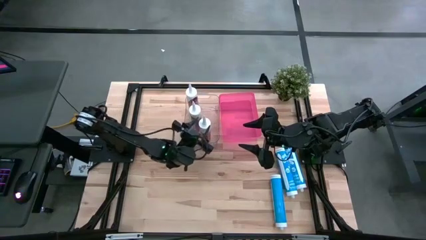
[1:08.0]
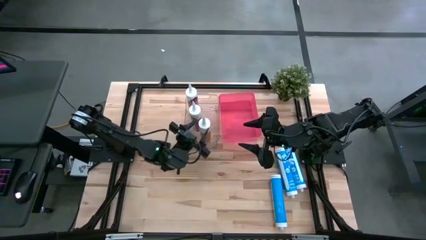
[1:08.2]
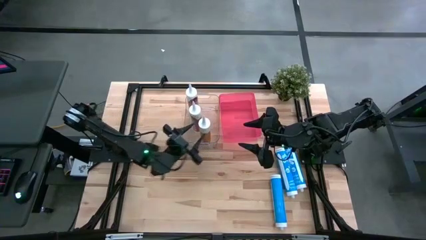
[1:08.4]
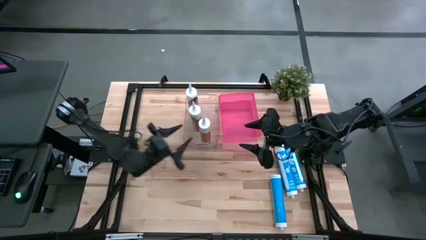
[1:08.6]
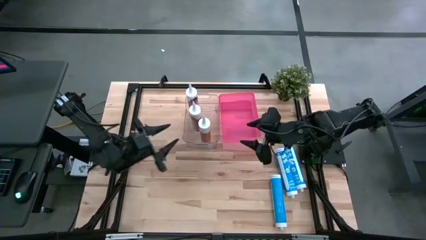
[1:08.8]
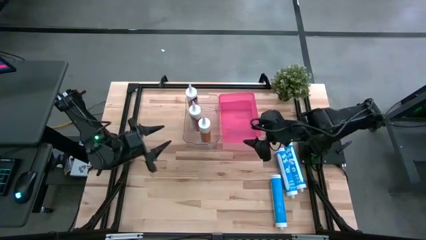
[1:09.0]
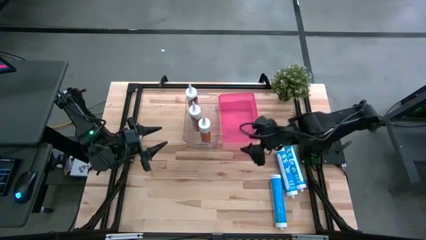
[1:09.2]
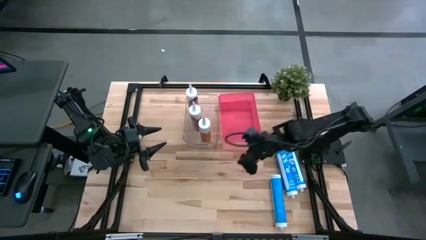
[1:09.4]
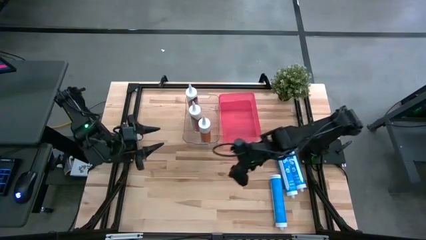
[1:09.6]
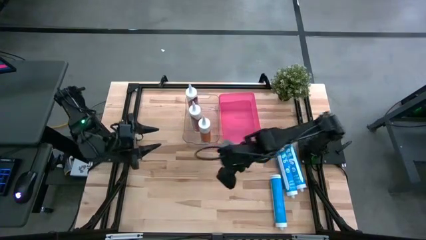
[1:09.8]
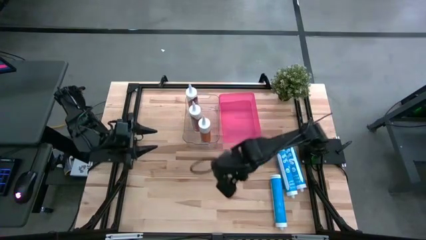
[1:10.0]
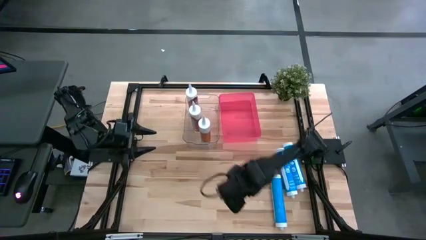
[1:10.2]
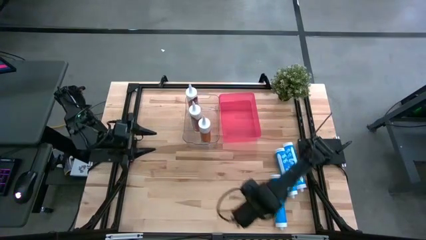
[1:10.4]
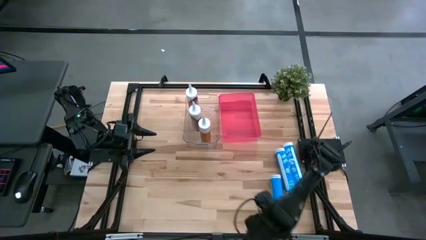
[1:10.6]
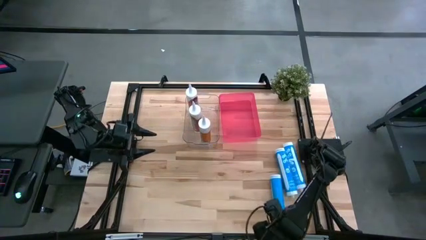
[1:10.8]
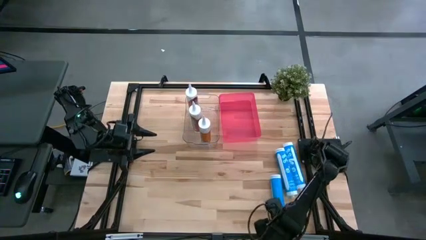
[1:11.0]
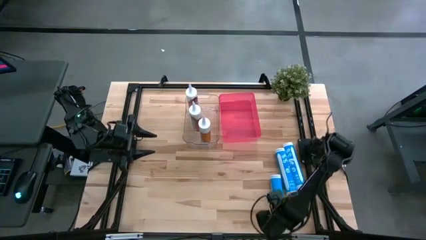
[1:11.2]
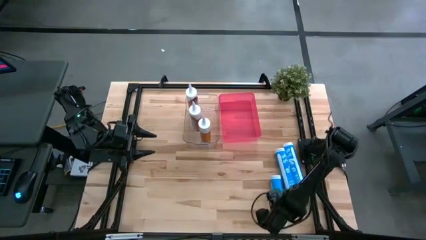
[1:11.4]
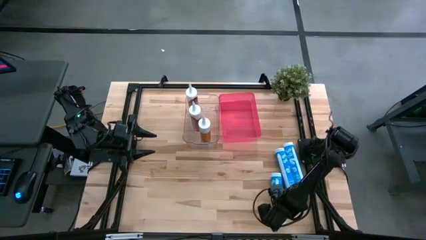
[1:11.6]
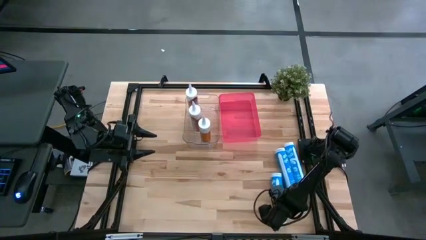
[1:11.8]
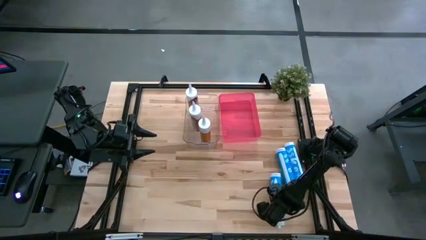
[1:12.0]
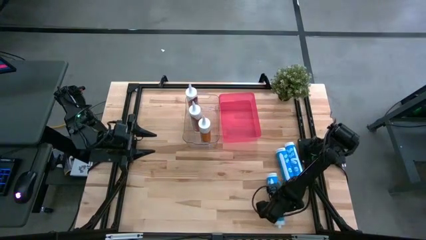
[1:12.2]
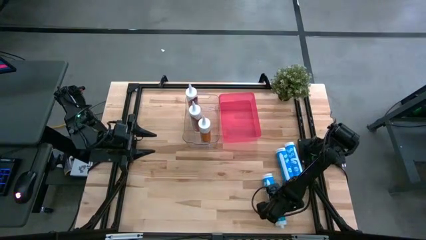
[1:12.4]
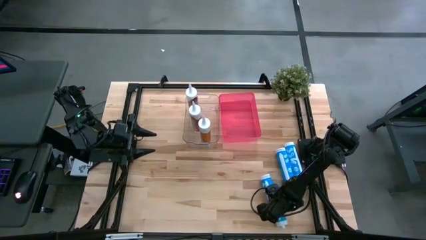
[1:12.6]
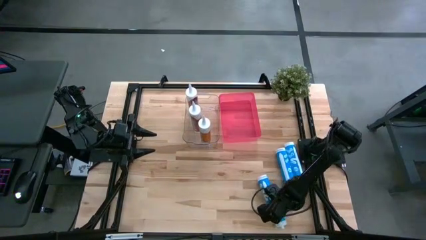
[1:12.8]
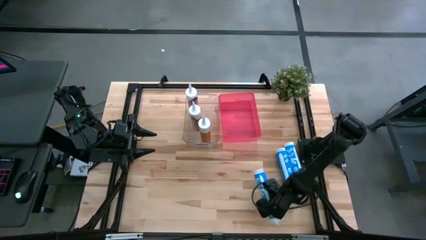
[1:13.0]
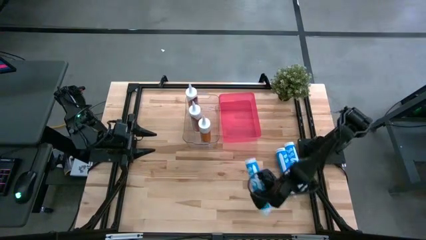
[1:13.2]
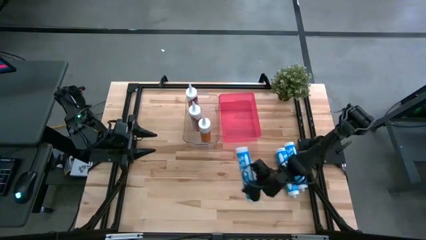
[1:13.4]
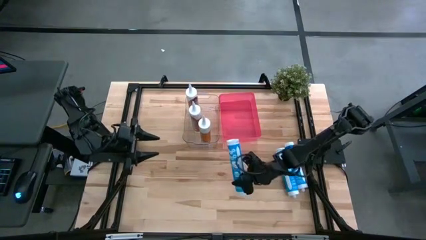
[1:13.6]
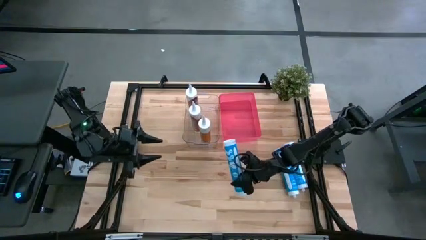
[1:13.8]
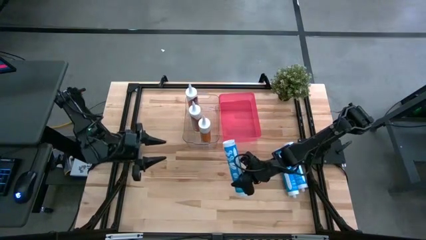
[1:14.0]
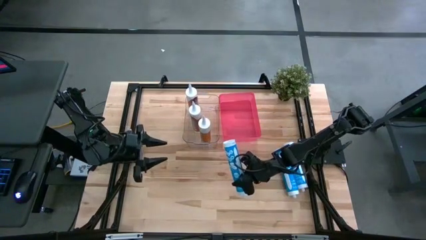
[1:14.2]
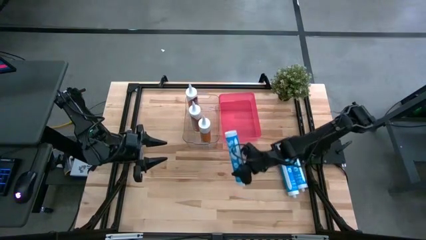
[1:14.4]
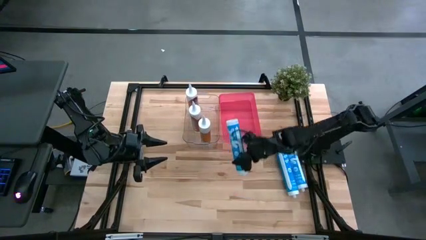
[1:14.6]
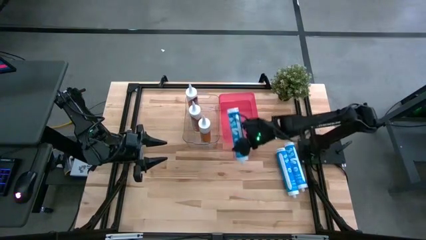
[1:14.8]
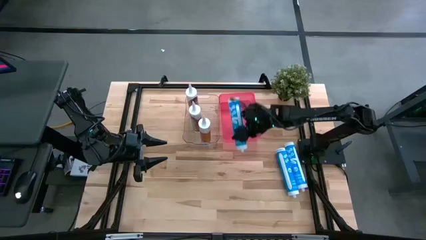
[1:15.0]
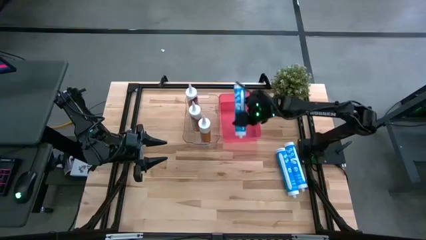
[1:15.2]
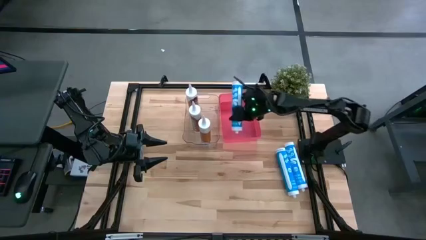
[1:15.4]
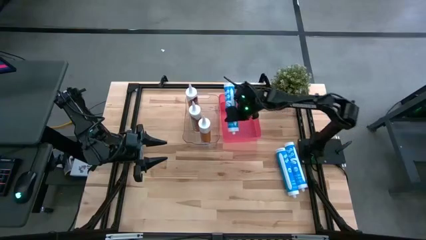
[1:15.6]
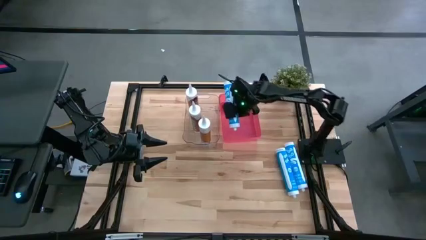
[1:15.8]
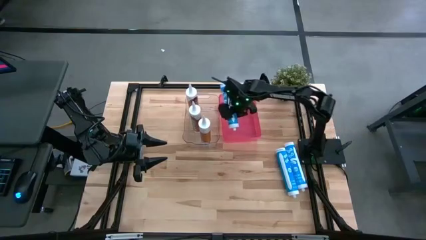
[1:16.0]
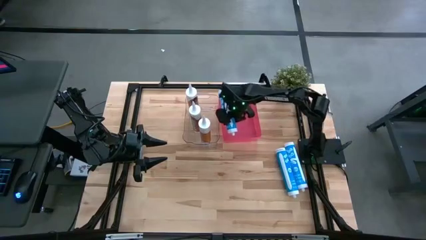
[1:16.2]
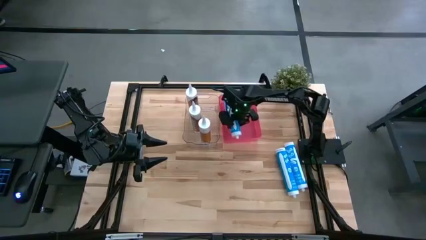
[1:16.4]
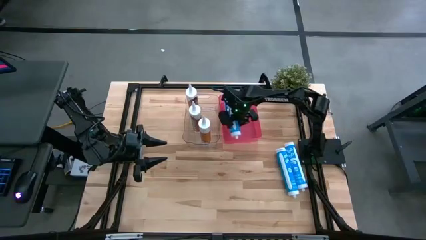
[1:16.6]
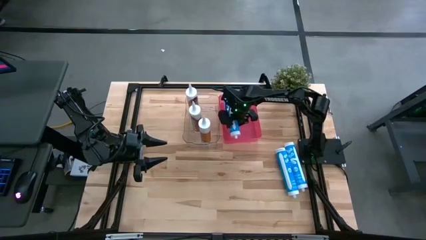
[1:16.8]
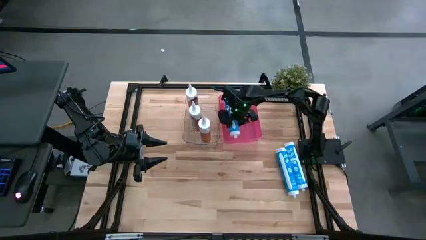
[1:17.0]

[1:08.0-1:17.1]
Task: Pick & place silicon tubes, Sealant and Lysol wipes
Put the bottom blue sealant into the red bin

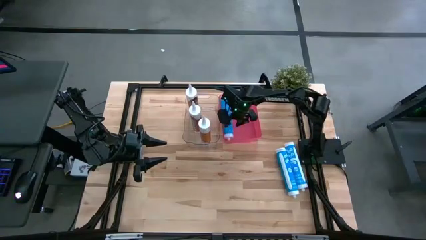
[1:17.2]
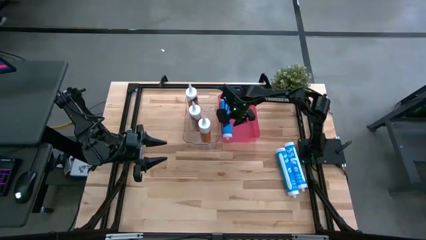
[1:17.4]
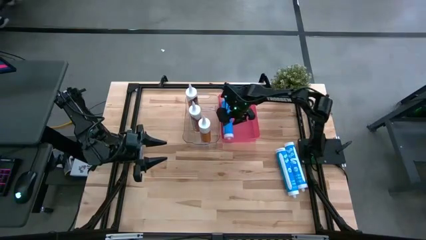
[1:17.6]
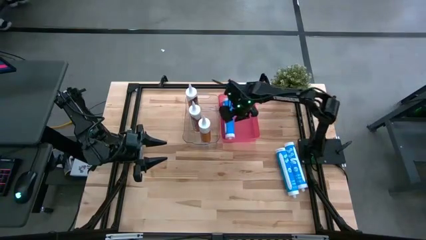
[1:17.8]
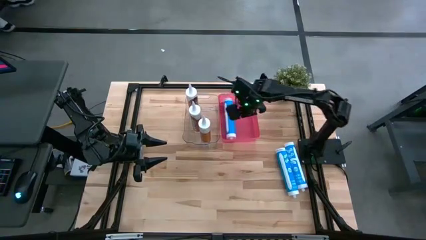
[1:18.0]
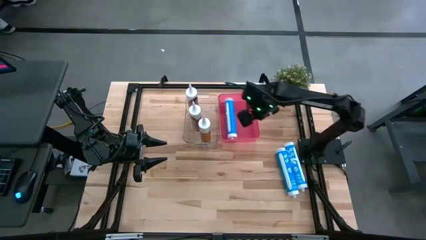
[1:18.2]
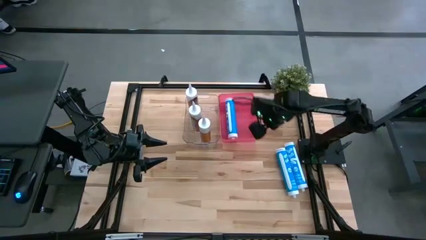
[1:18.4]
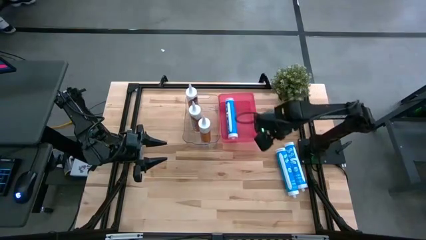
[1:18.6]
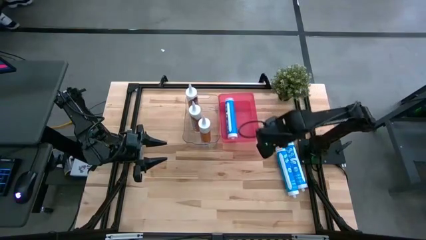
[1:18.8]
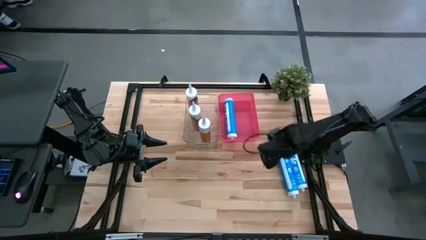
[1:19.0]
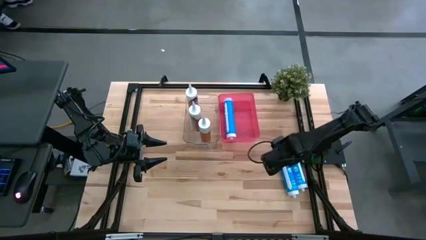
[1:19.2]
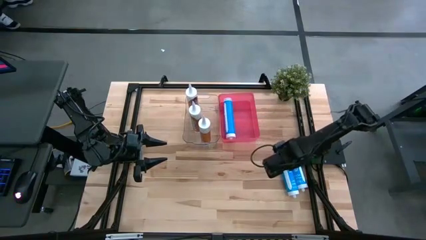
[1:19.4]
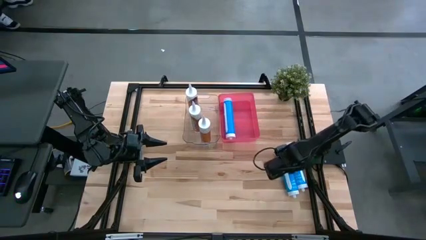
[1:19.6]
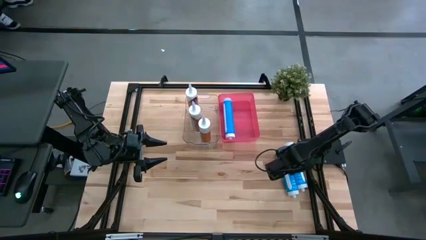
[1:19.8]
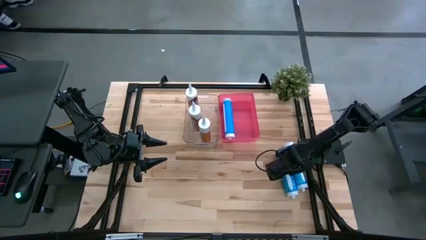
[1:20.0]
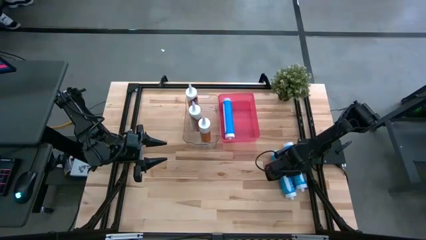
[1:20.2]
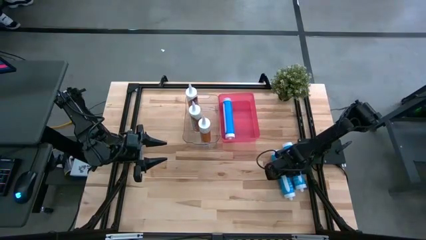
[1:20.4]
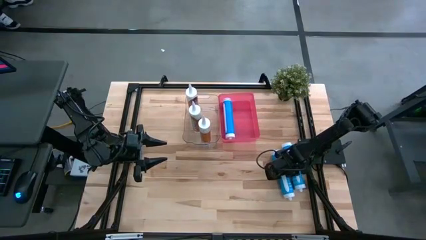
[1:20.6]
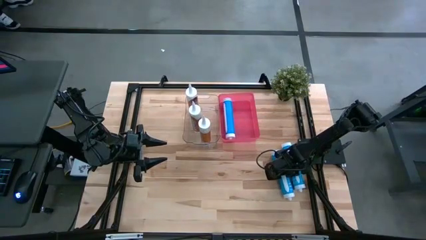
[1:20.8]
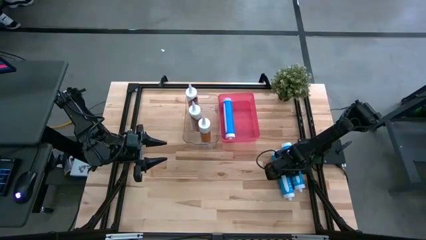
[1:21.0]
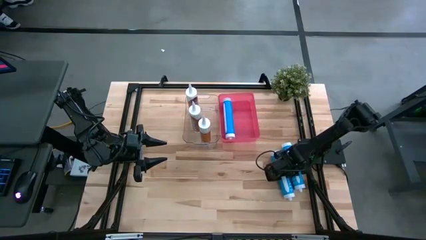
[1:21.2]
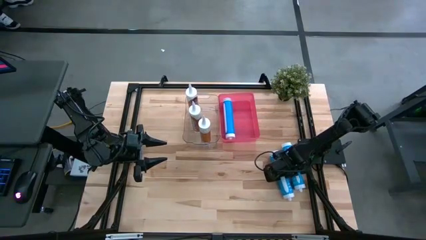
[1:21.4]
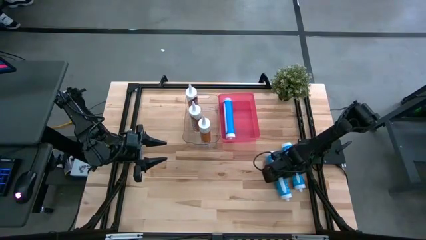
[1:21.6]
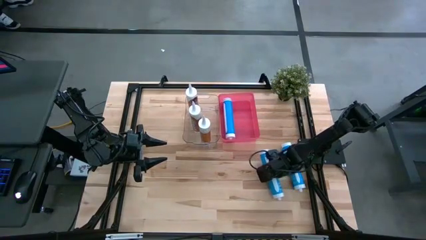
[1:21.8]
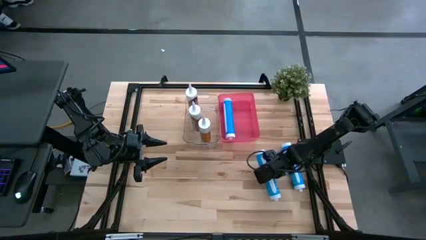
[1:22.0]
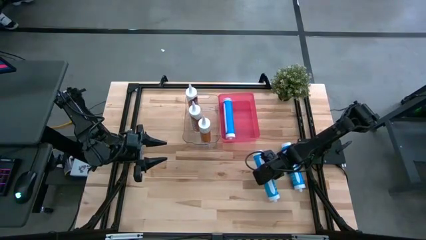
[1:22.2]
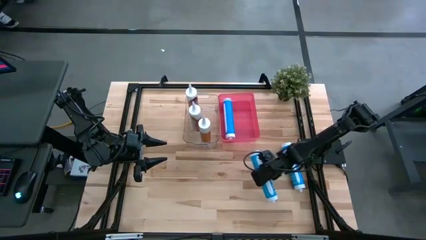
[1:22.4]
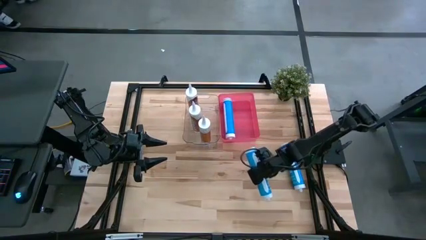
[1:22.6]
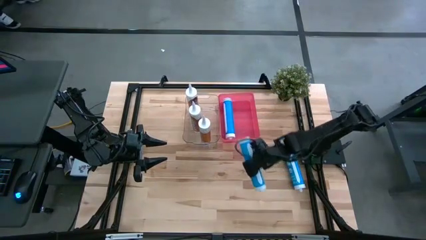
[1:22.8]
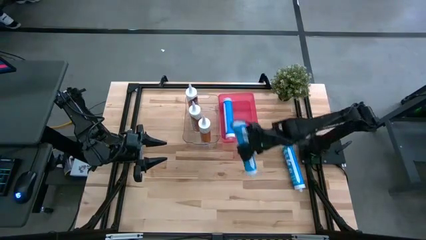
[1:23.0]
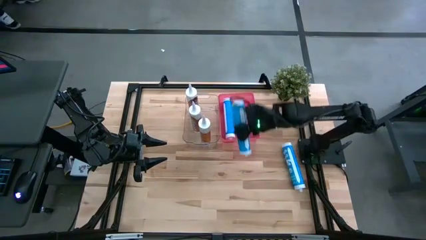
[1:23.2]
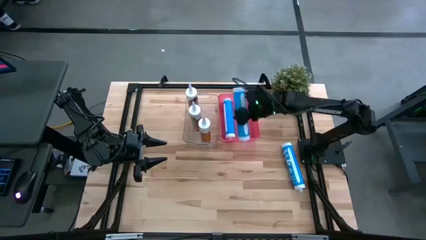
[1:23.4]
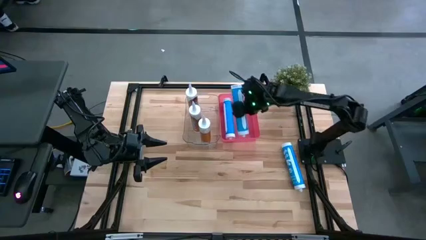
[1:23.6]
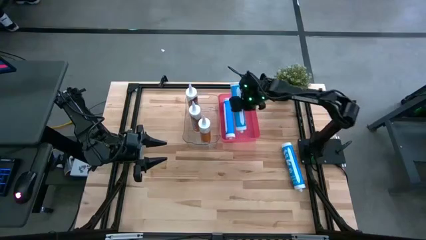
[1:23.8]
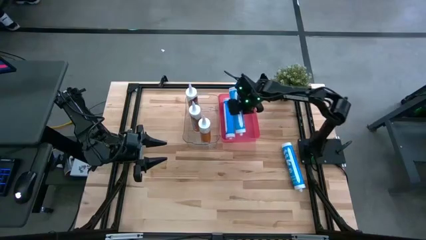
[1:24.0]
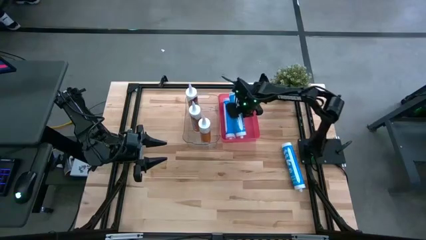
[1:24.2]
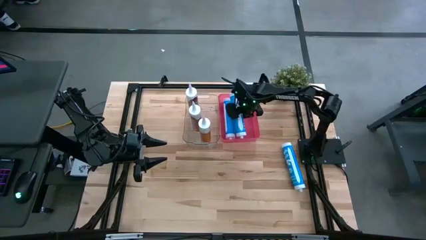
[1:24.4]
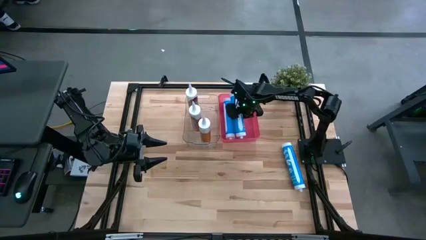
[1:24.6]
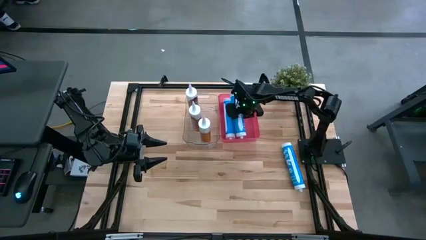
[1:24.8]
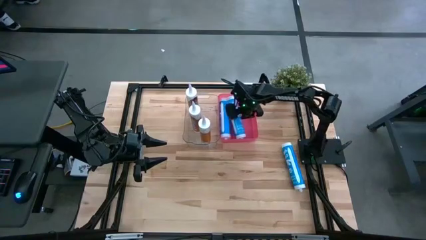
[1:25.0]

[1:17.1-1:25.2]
Put the left blue sealant into the red bin
